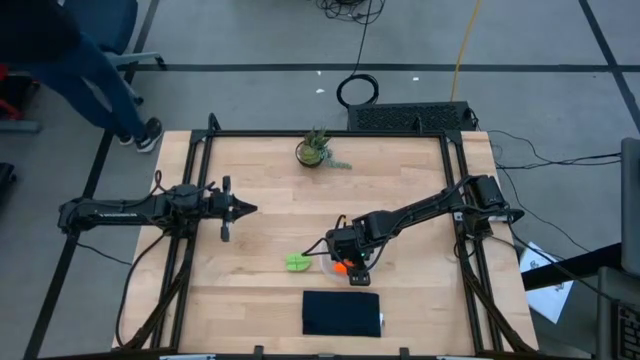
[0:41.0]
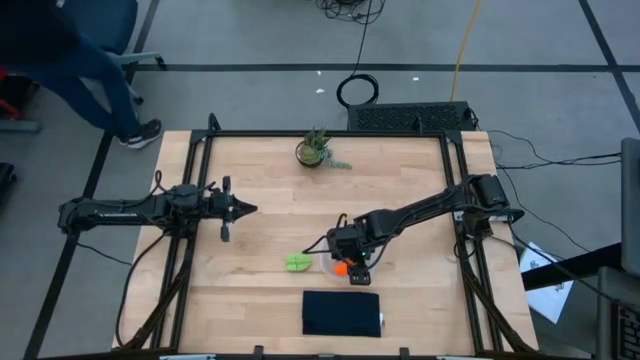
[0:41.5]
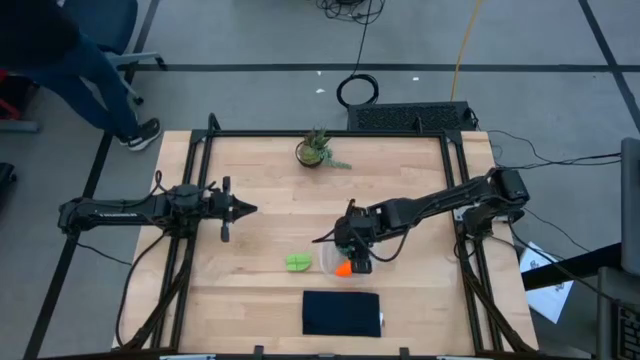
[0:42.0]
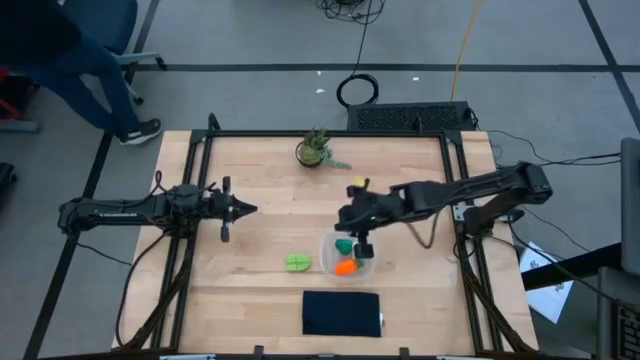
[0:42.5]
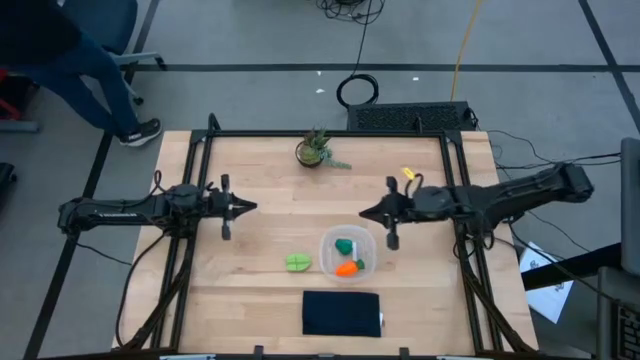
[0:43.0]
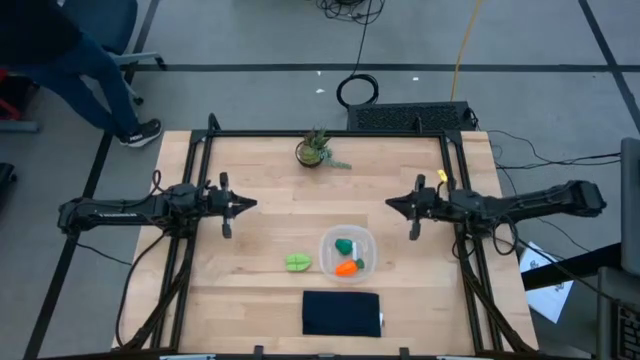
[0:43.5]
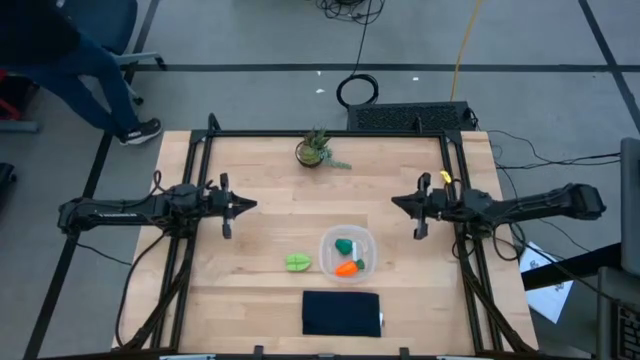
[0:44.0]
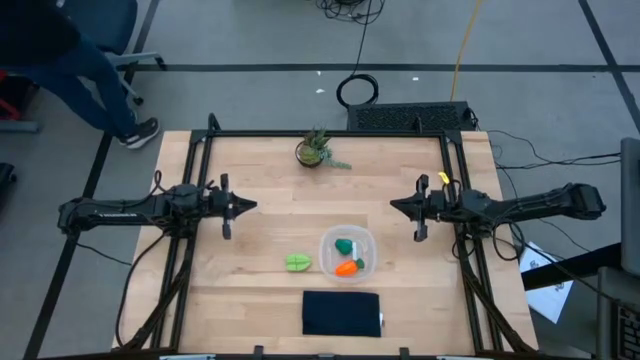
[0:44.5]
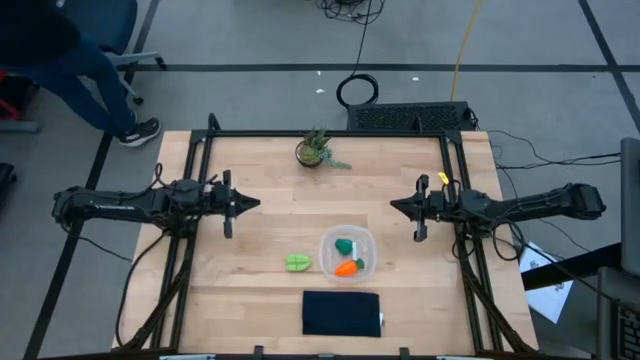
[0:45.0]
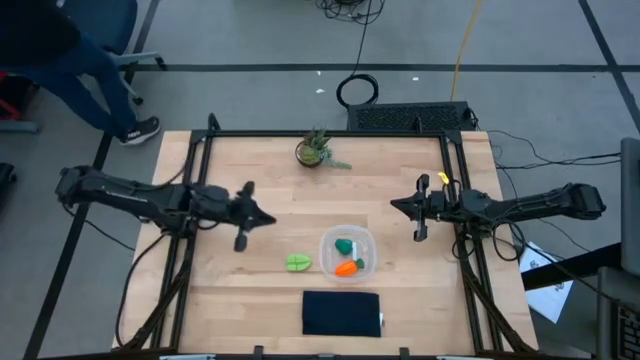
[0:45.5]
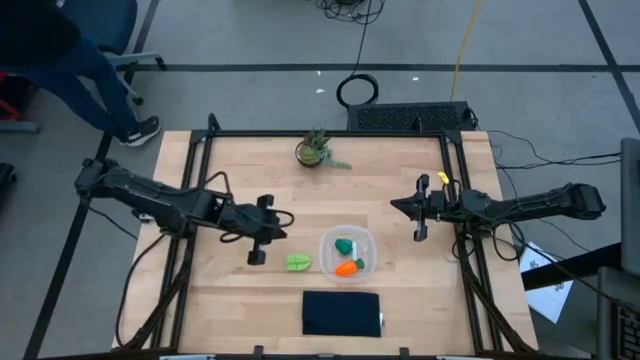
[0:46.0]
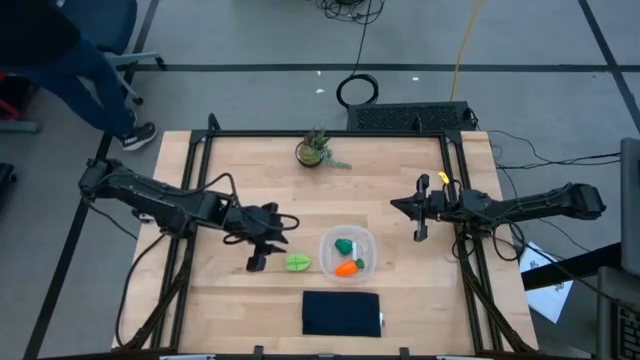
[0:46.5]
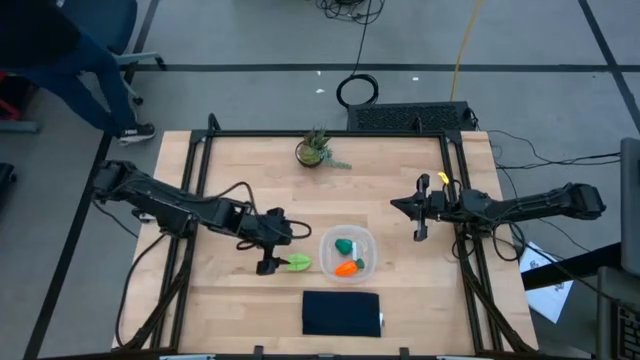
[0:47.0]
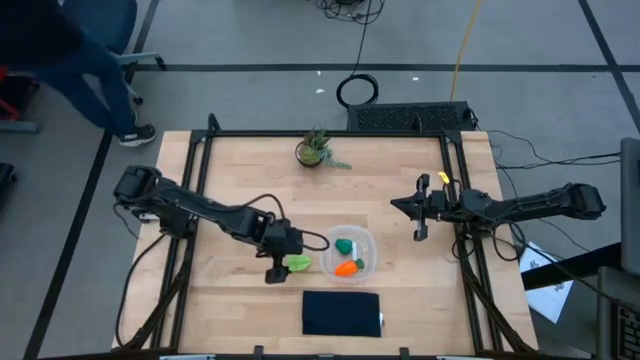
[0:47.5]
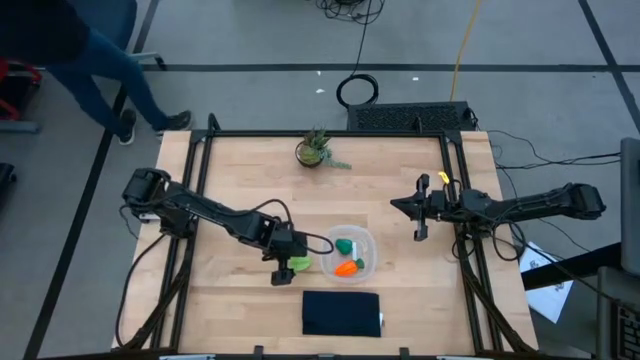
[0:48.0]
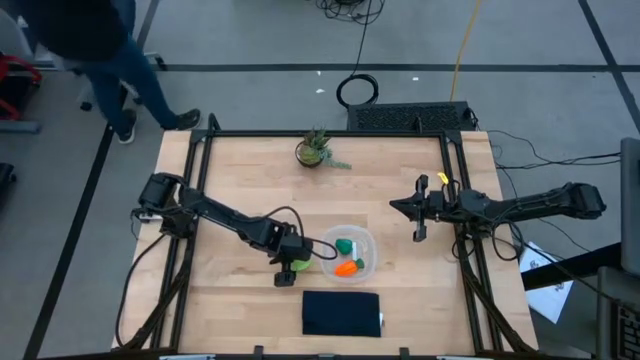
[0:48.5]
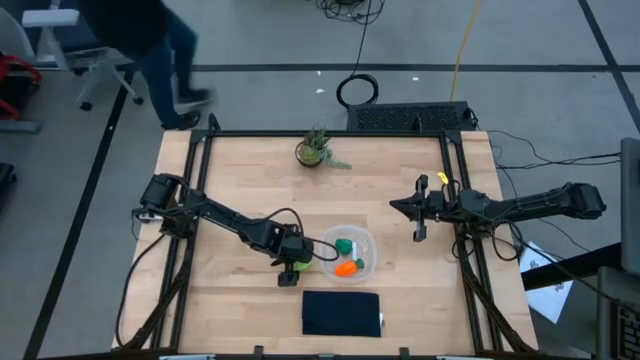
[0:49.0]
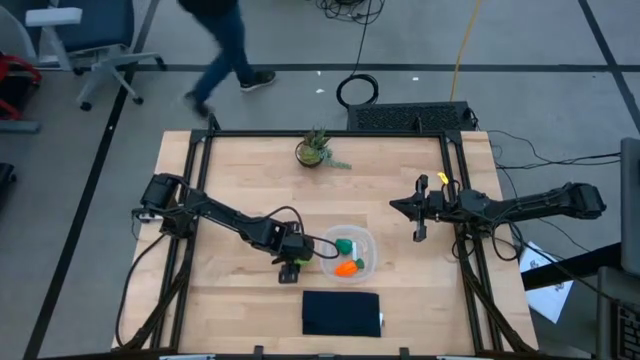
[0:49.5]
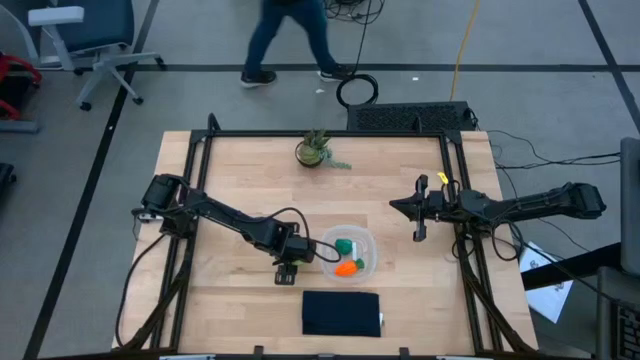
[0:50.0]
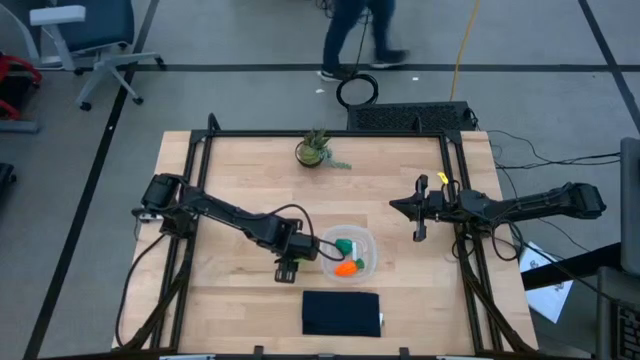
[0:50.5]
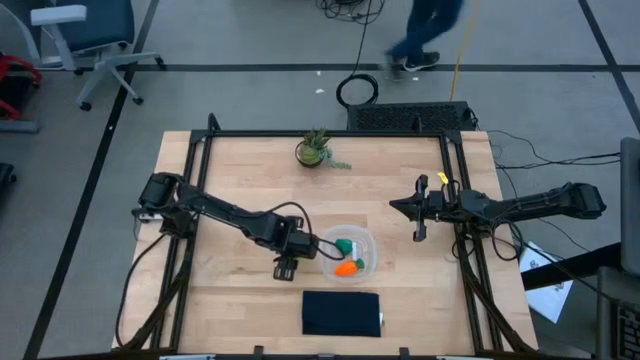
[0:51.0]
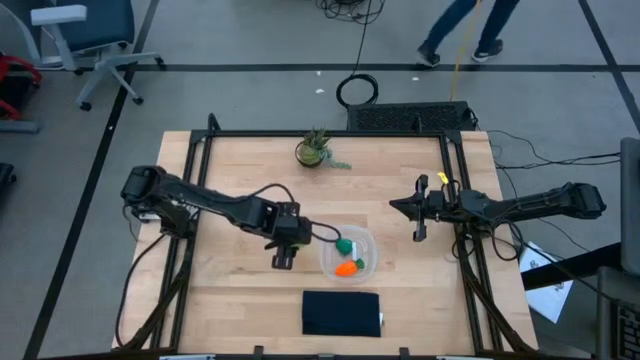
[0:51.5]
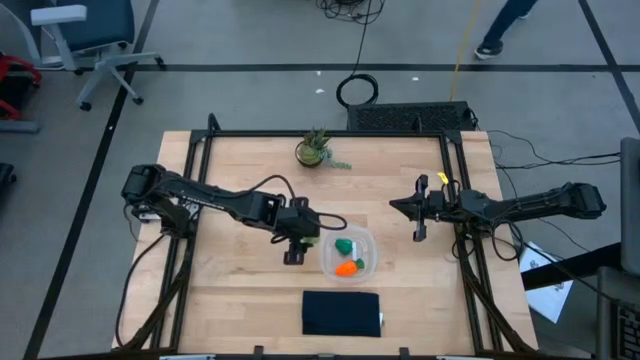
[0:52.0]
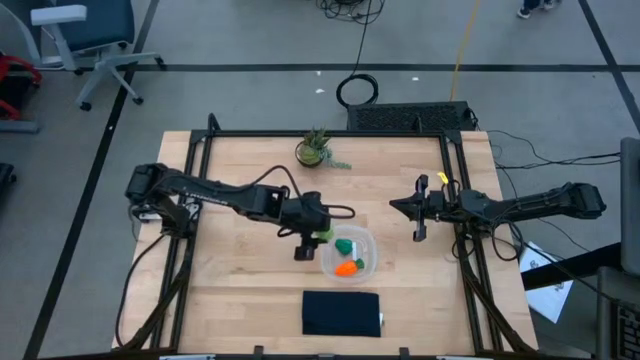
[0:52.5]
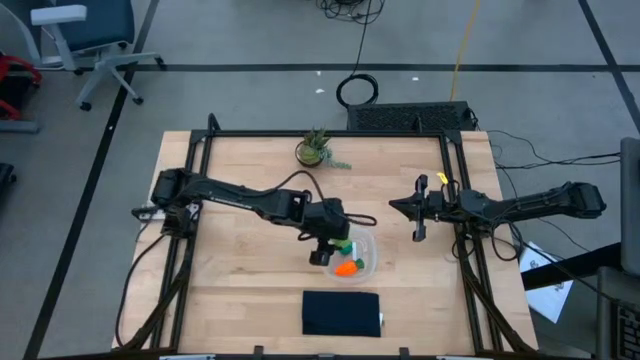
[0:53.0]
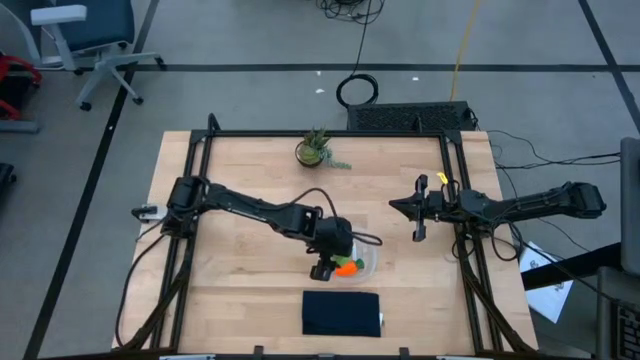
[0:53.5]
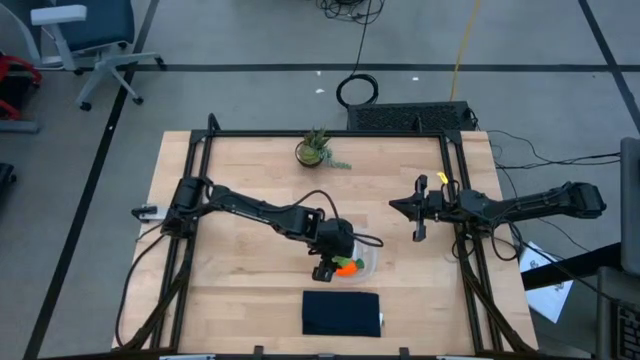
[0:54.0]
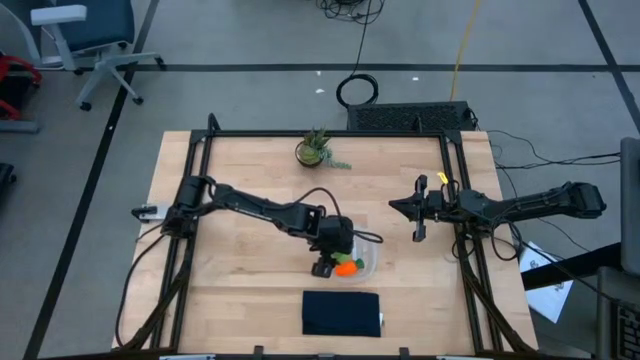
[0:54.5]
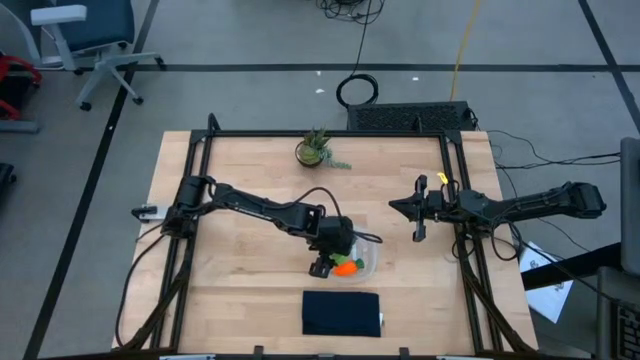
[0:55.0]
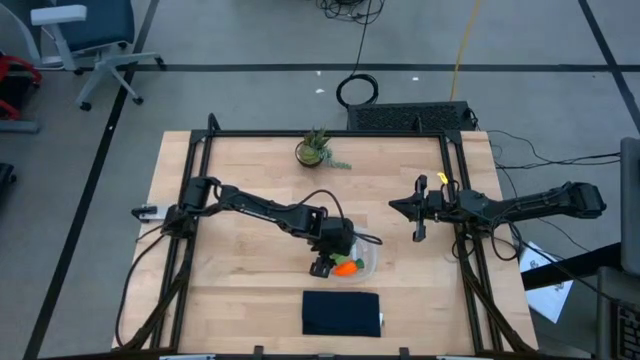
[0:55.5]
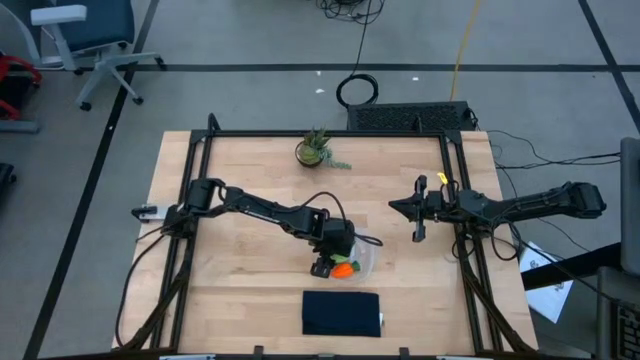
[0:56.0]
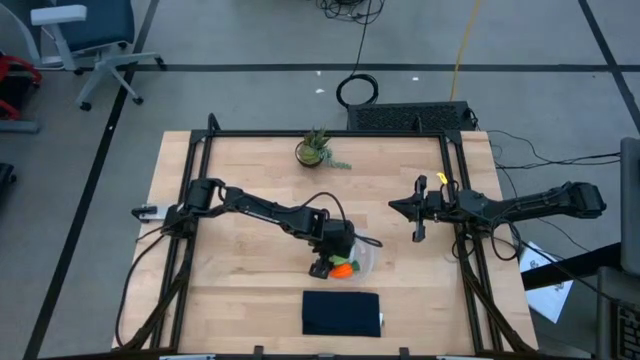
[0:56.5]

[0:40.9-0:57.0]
Task: Pick and placing Produce into tupperware
Put the green starfruit into the transparent container

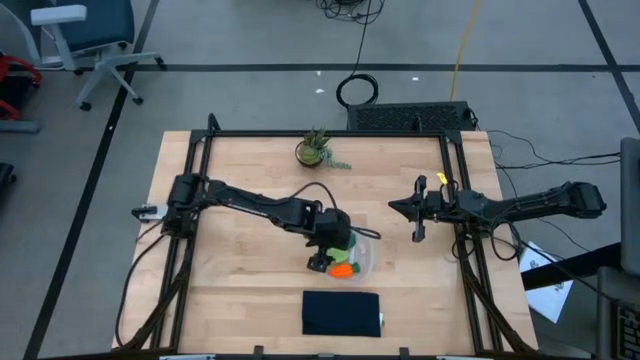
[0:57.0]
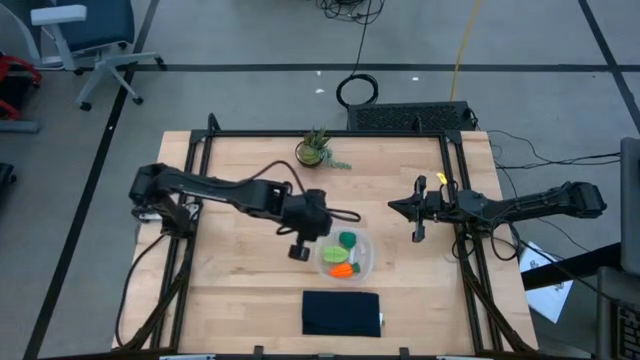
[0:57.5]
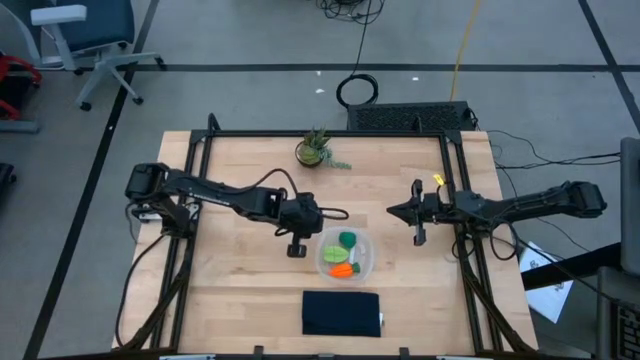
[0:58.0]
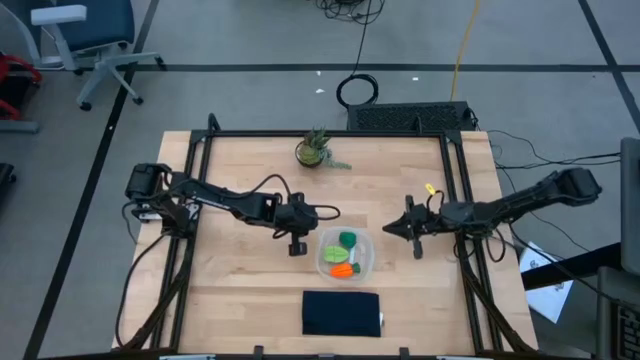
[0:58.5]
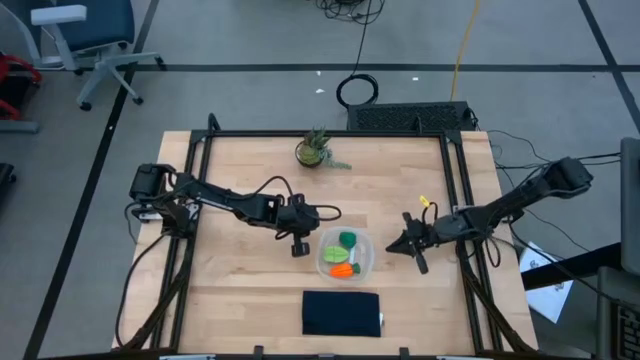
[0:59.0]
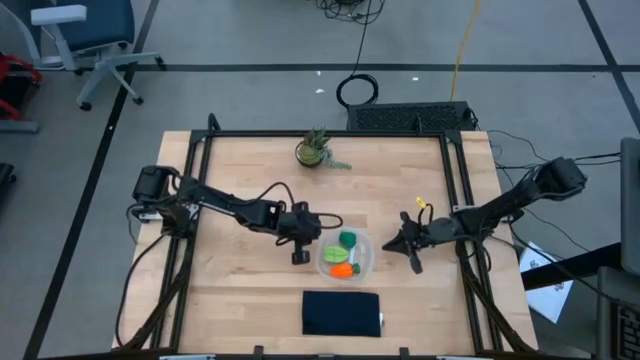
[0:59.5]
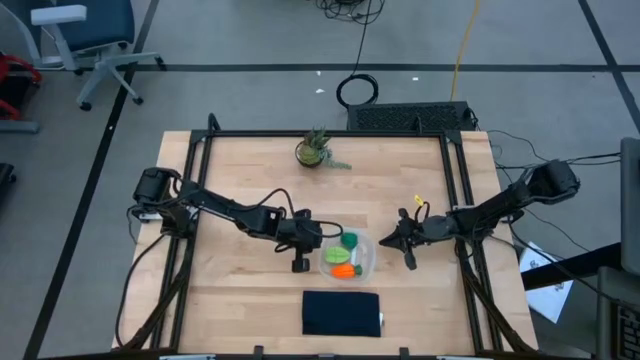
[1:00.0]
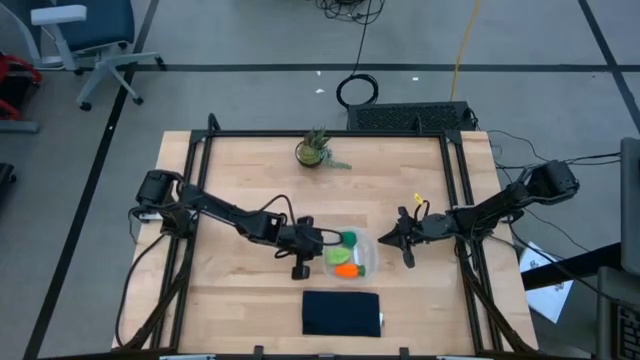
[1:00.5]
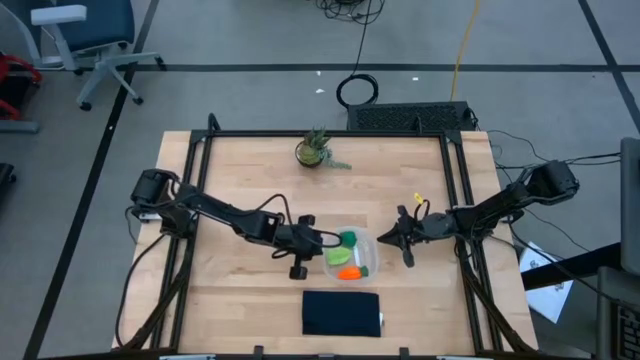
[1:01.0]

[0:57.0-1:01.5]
Adjust the transparent container

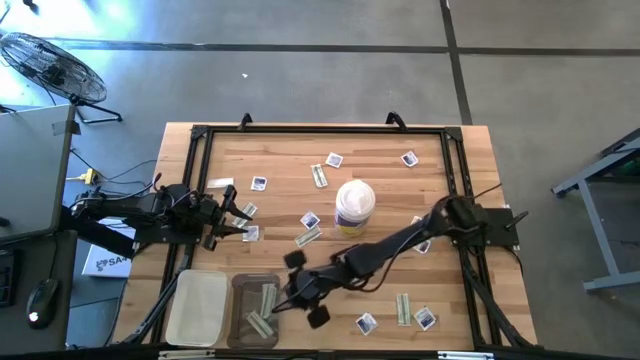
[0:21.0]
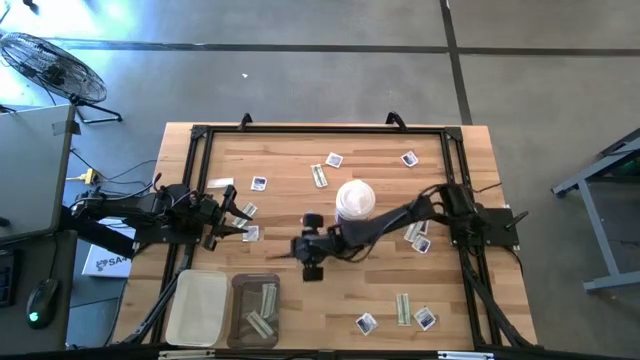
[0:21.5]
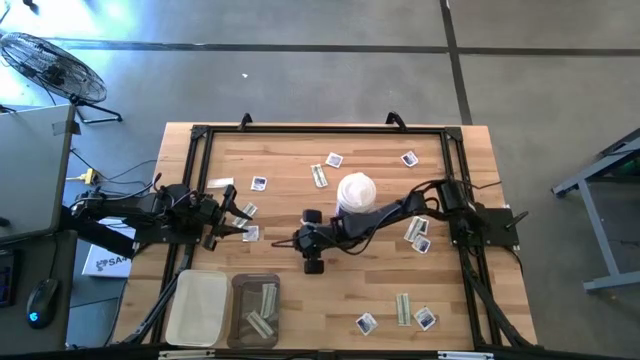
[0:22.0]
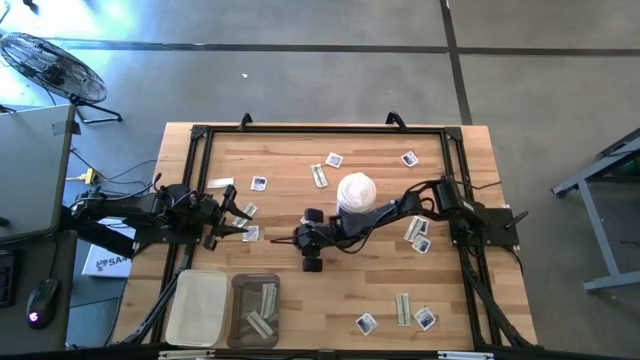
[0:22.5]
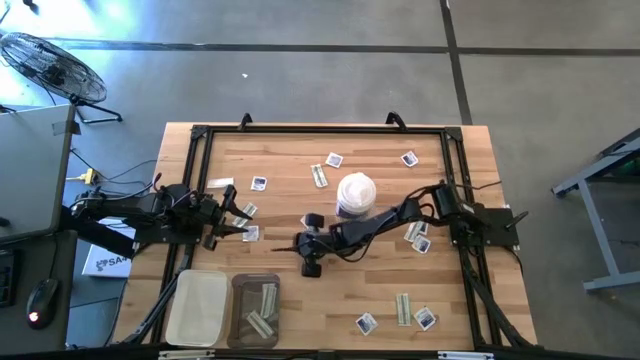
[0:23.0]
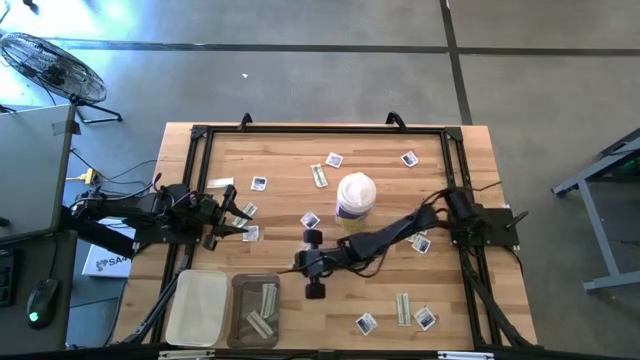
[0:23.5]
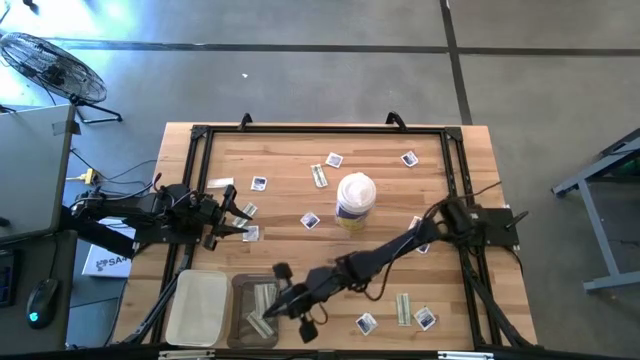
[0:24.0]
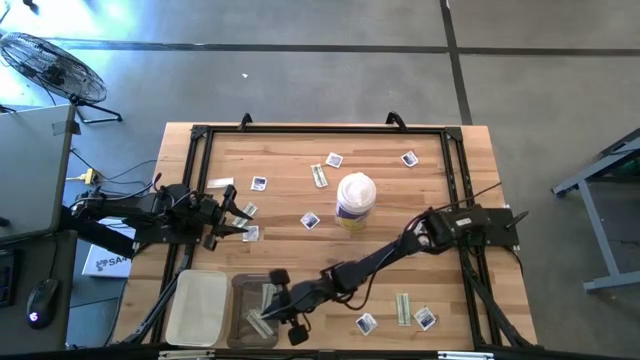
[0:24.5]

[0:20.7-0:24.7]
Task: Pick & Place First Aid Supplies
Put the bandage into the black transparent bin
